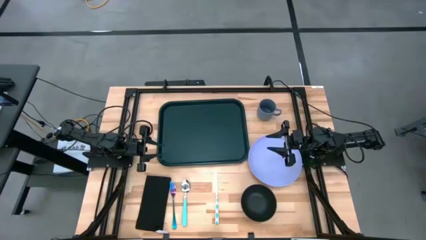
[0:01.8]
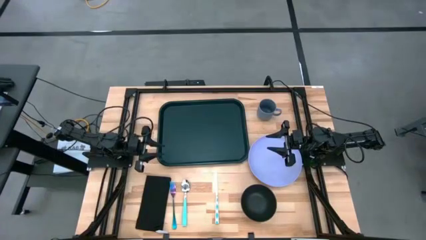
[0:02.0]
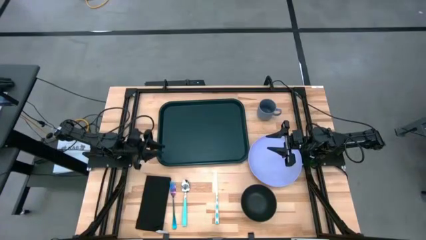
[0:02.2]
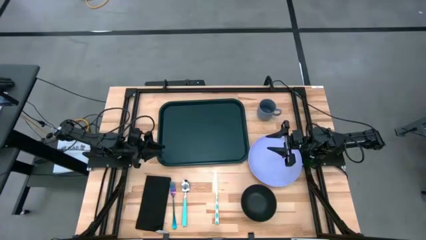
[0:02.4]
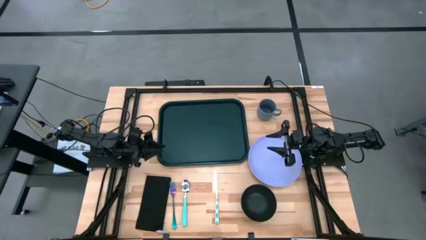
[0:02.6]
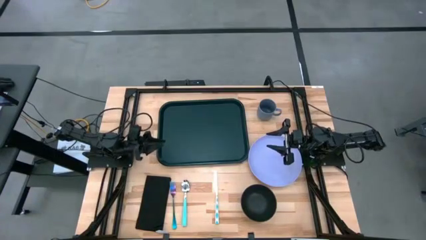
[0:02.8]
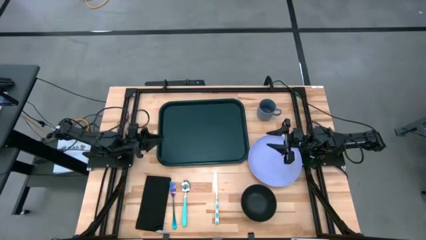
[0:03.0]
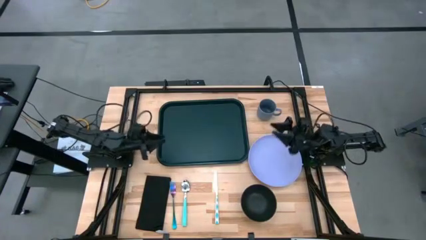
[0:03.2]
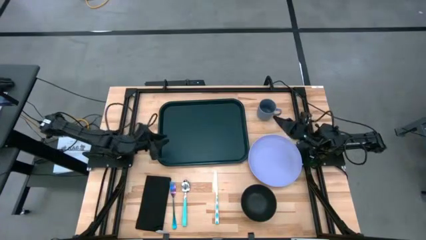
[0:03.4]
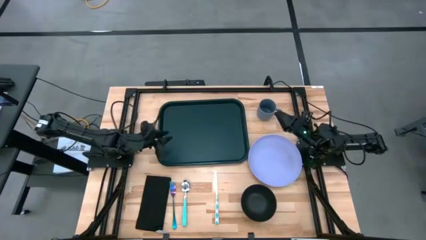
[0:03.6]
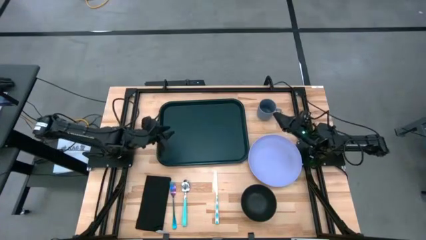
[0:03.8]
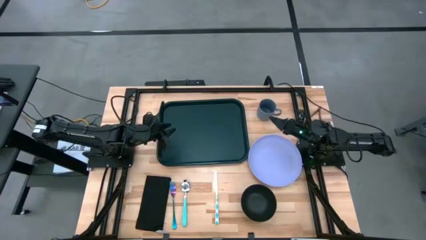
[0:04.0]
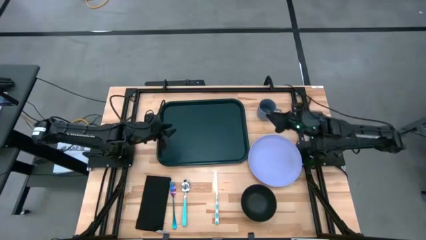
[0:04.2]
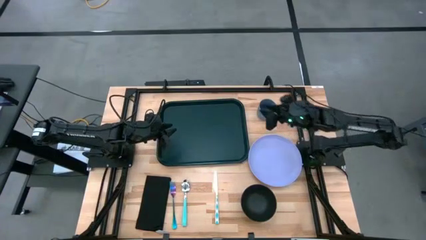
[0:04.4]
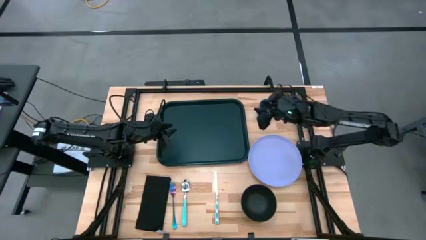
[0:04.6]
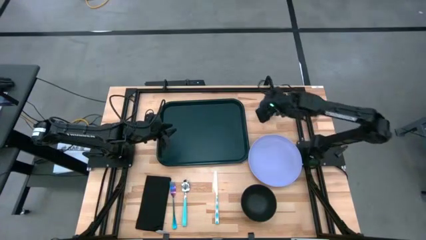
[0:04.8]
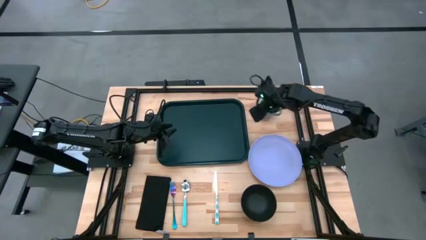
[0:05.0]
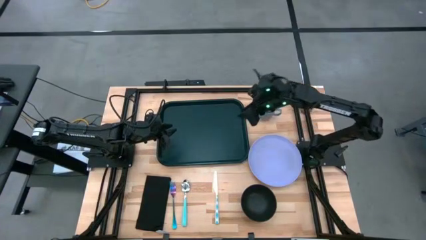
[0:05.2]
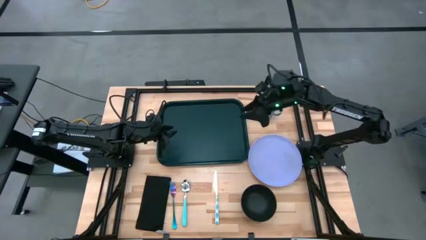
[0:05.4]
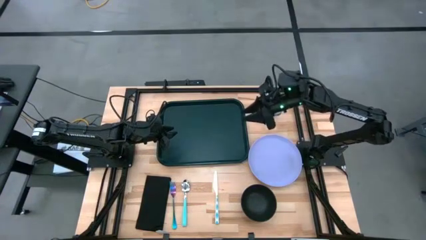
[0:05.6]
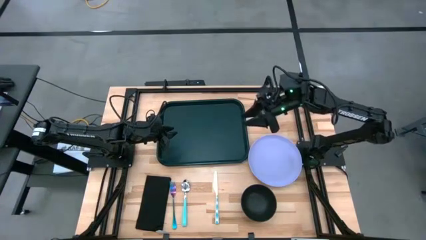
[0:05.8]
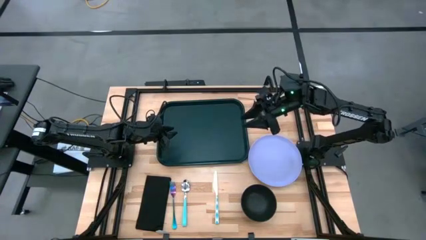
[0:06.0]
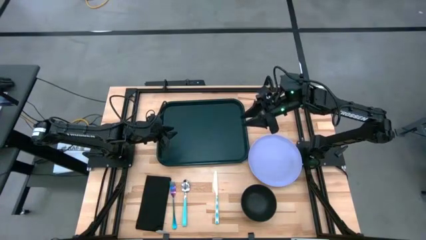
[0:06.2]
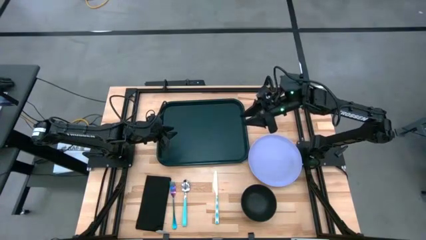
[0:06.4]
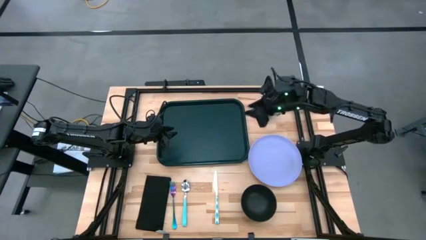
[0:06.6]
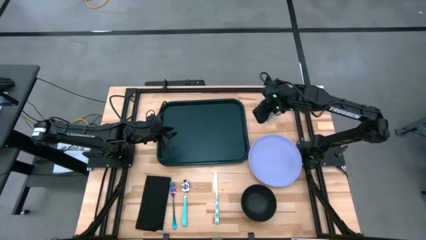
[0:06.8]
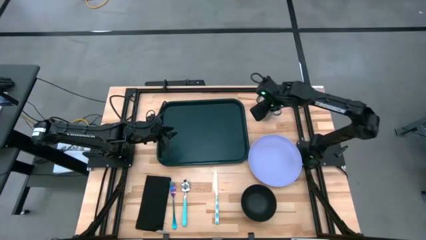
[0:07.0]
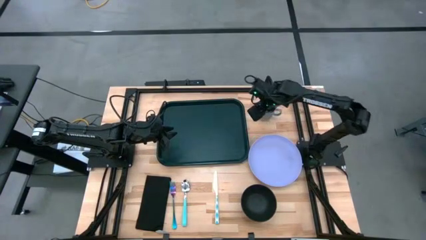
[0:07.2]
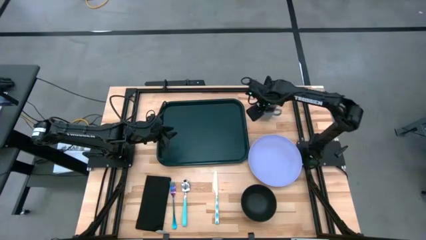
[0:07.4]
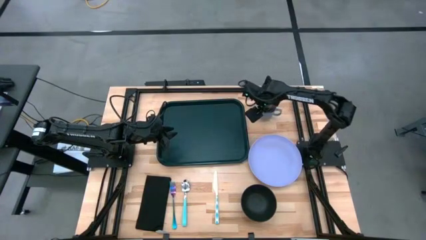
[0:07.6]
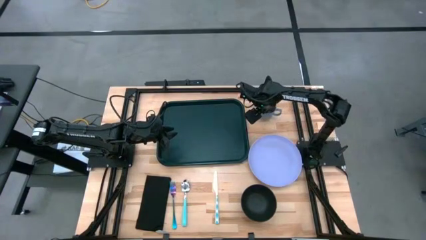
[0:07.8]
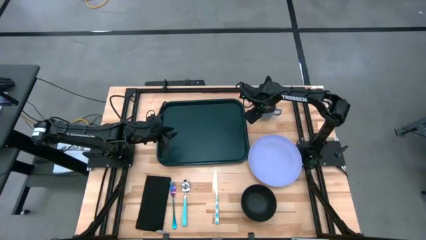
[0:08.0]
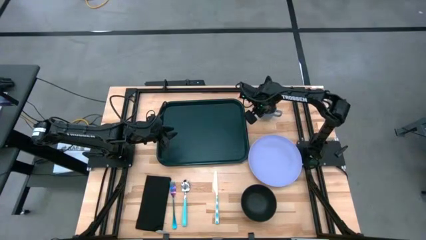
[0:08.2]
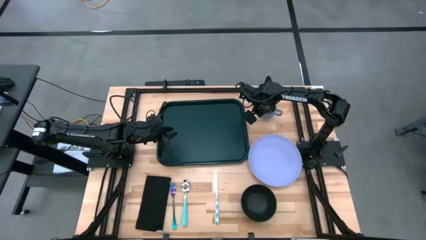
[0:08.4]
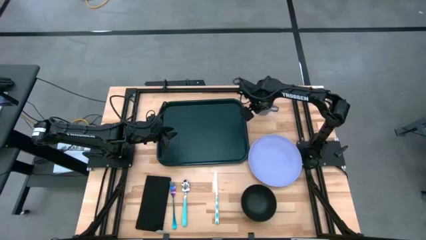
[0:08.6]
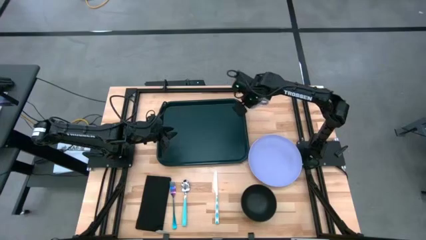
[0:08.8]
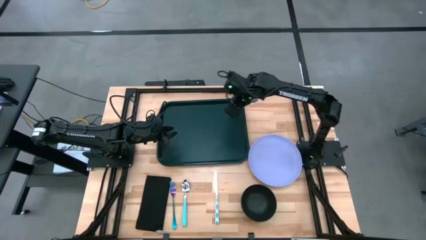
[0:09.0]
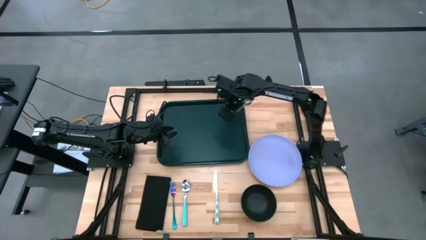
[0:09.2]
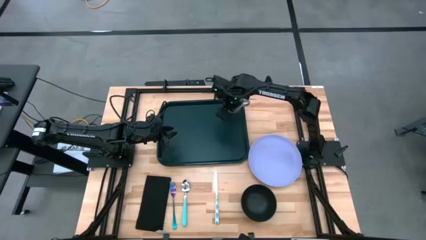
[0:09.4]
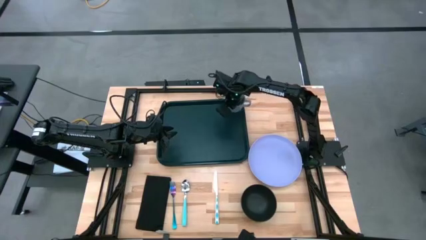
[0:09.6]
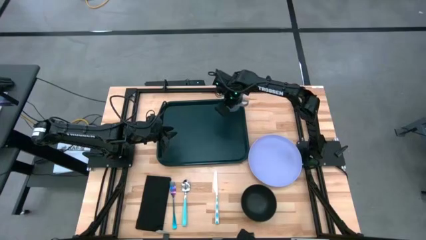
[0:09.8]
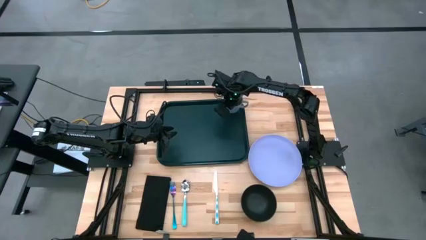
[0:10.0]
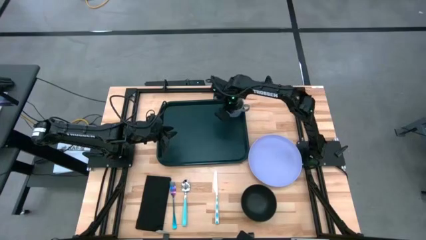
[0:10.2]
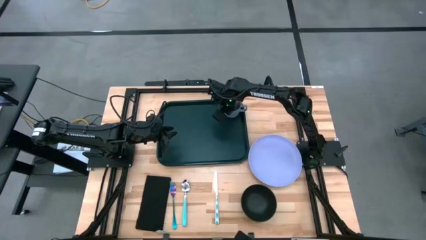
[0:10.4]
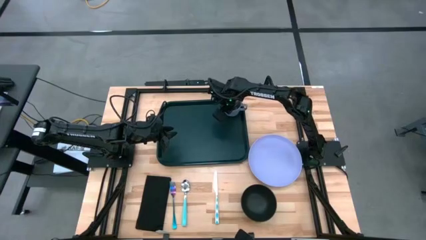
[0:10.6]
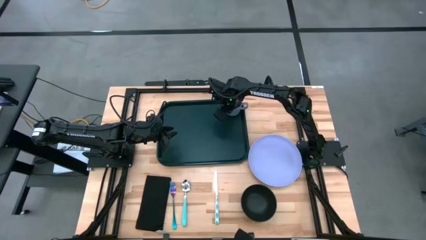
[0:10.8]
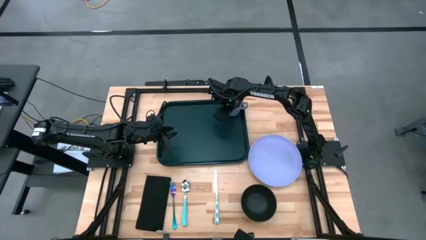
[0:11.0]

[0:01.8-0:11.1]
Task: Set up tray
Put the gray mug on the black serving tray

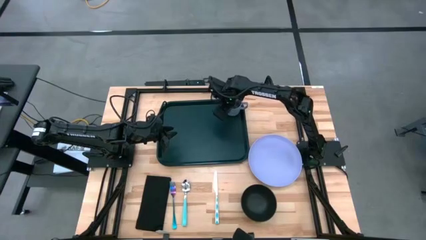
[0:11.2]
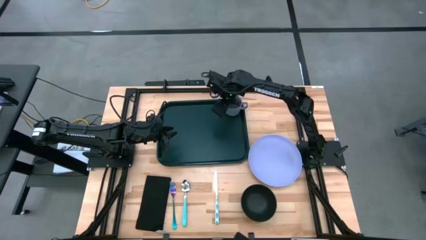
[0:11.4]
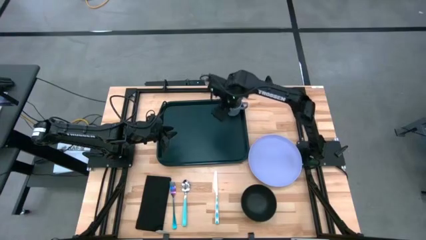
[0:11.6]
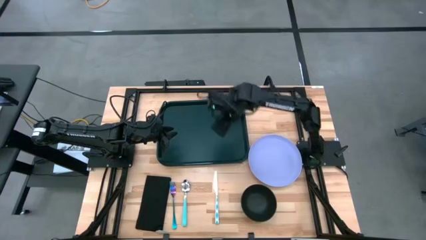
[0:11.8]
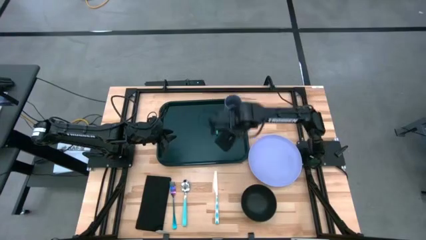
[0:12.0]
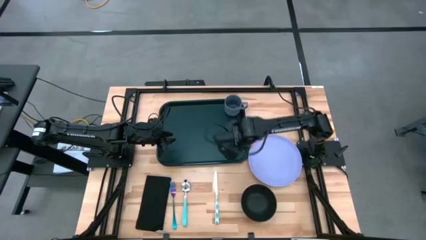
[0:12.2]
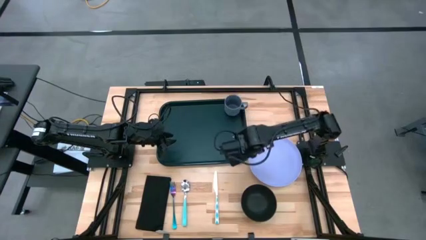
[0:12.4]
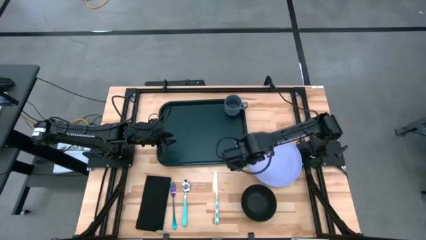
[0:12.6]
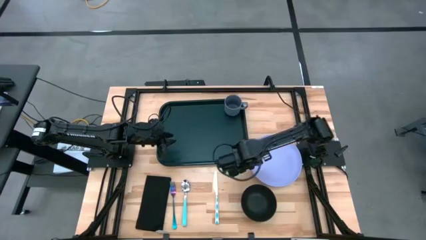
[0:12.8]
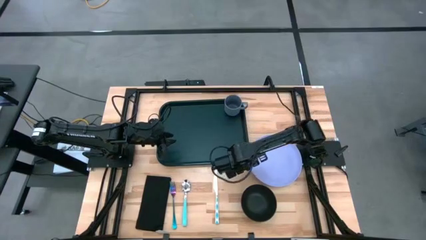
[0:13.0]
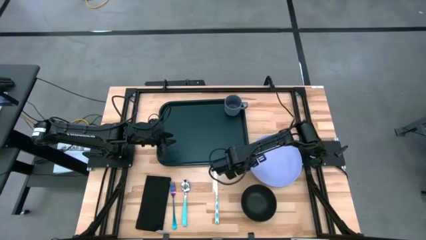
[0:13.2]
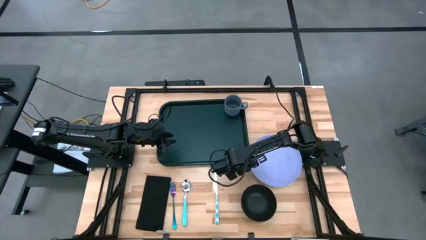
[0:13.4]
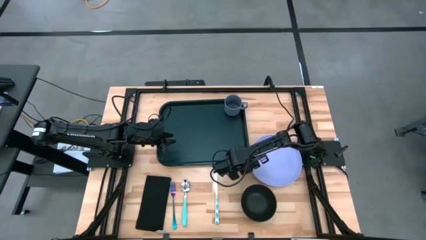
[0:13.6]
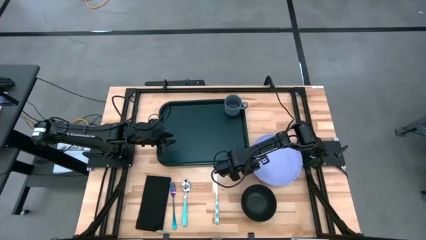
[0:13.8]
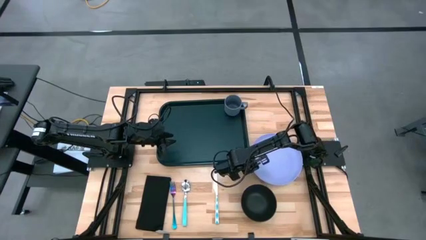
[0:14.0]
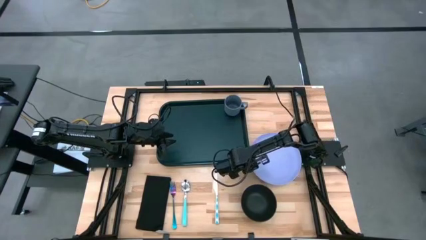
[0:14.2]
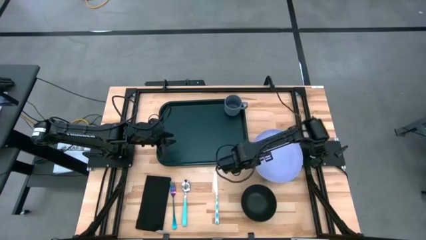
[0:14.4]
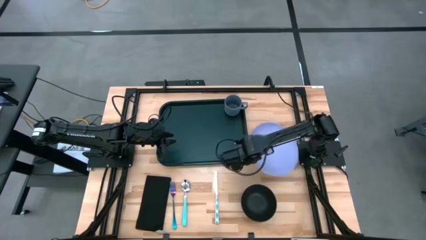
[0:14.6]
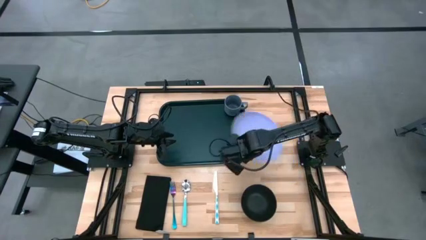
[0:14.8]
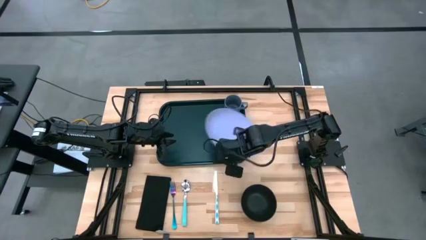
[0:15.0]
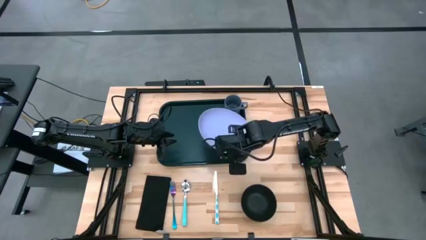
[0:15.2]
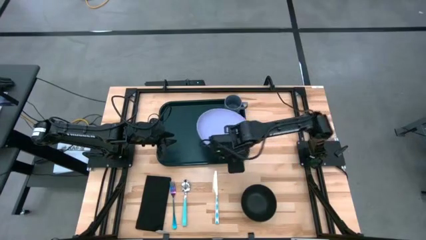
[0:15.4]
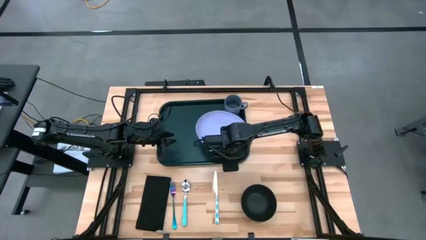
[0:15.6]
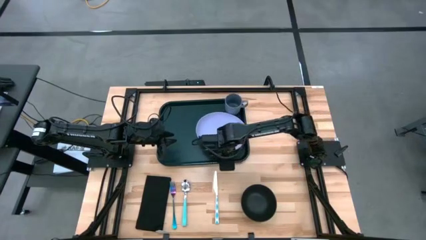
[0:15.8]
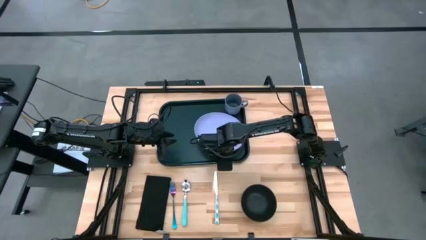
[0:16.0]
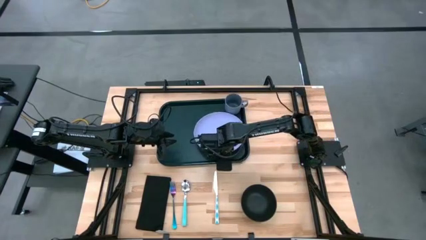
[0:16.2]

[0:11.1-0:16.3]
Put the violet plate under the gray mug on the black serving tray

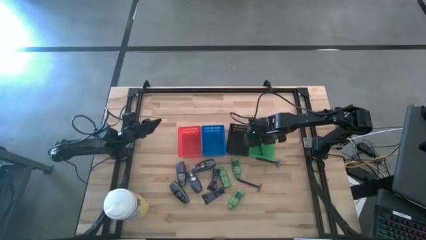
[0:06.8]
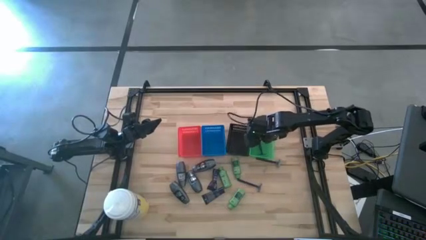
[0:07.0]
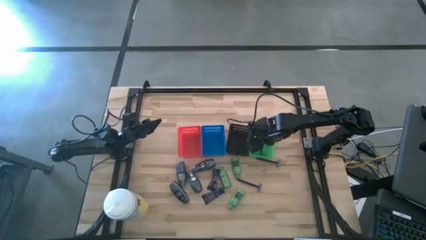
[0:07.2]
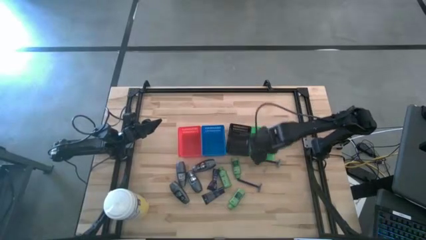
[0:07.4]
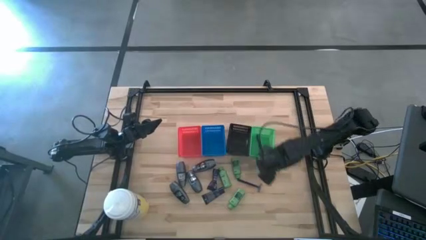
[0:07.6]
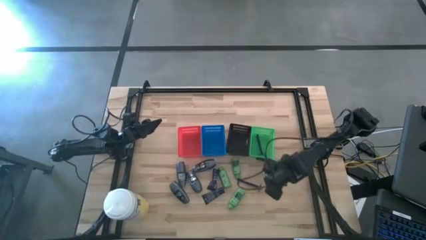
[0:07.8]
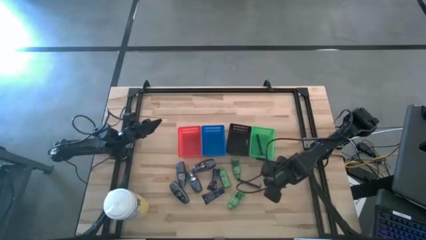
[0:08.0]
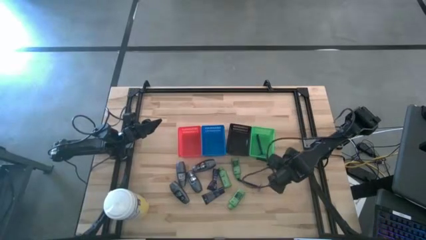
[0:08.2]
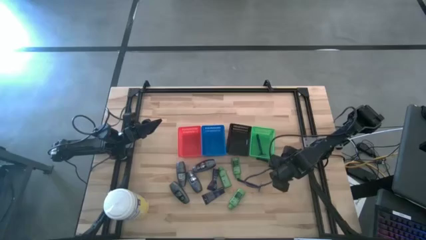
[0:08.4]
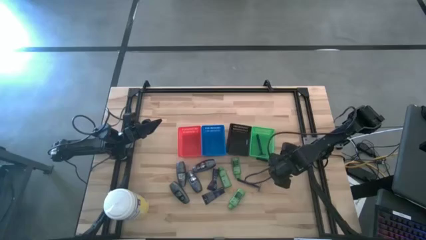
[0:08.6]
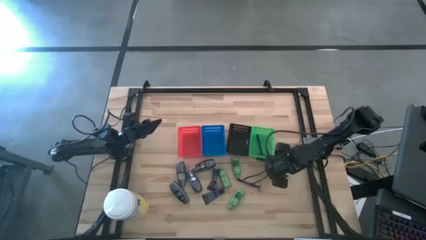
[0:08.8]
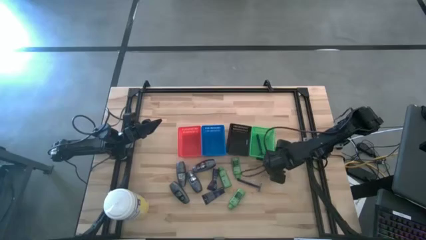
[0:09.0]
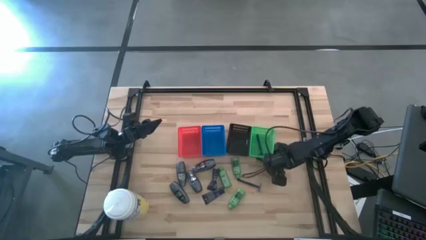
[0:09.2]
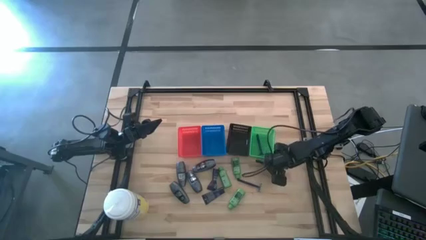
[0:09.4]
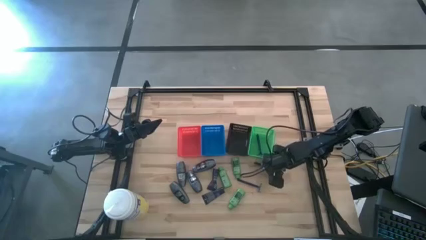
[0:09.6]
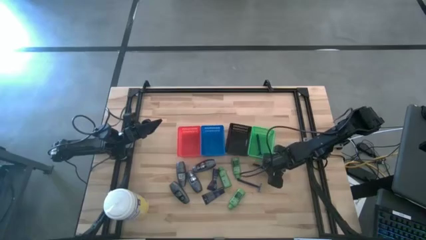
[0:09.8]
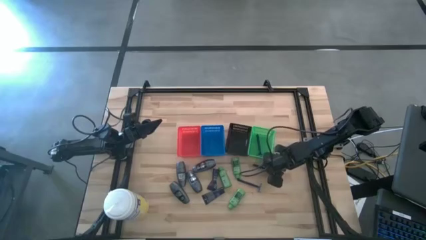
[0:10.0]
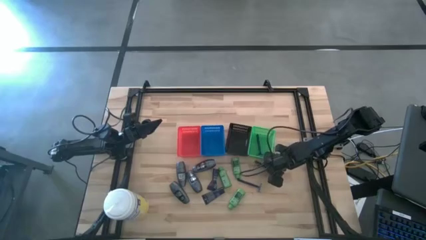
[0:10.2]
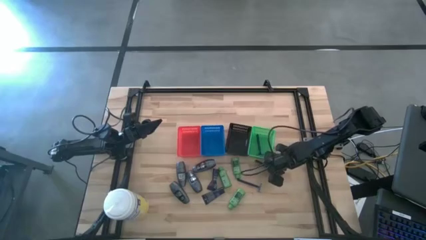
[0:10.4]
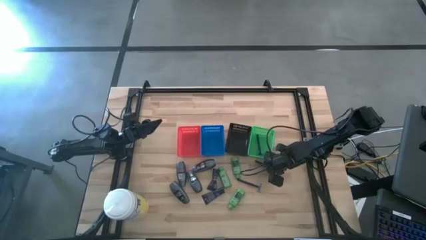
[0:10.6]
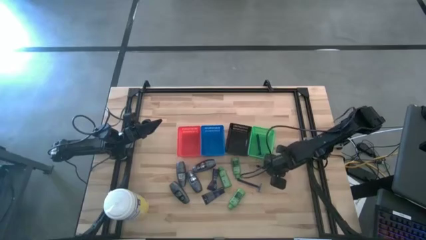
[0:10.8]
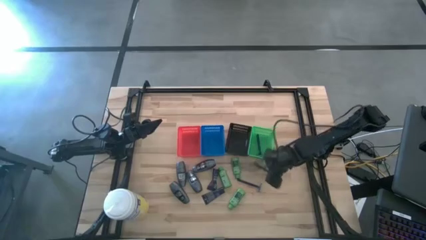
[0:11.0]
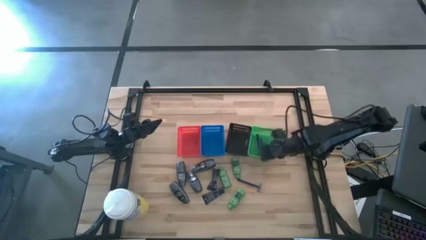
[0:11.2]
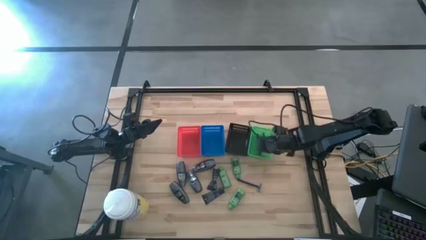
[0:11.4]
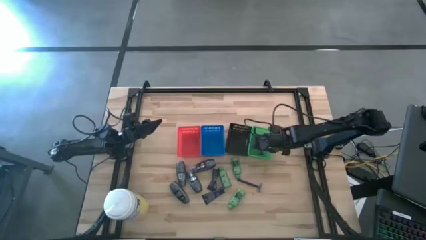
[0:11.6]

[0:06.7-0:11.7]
Task: Pick & Place Travel size toiletries
Put the razor into the green bin
